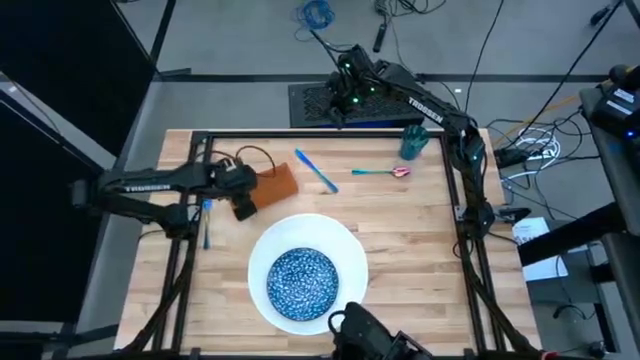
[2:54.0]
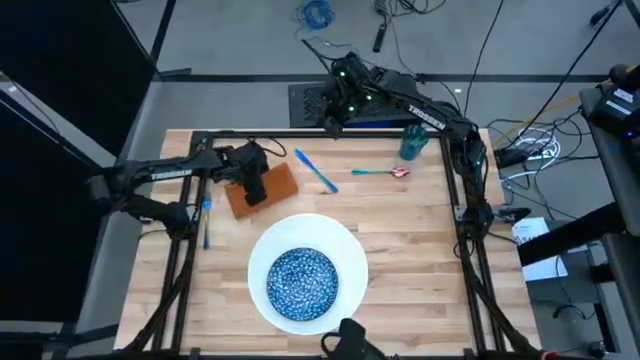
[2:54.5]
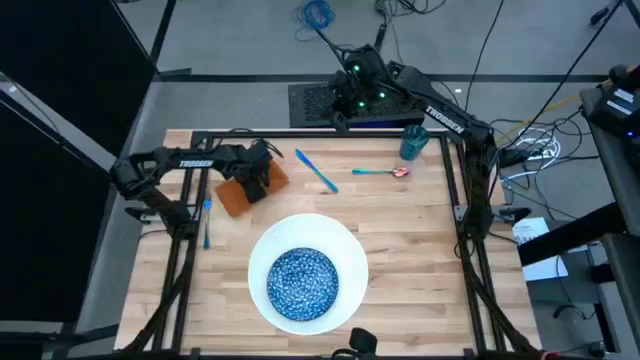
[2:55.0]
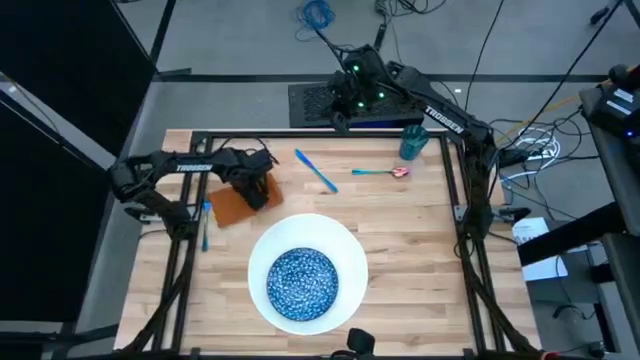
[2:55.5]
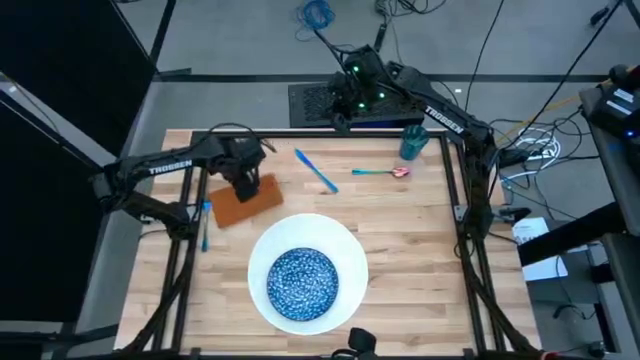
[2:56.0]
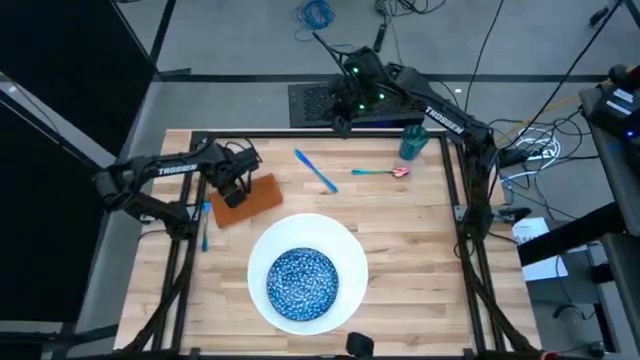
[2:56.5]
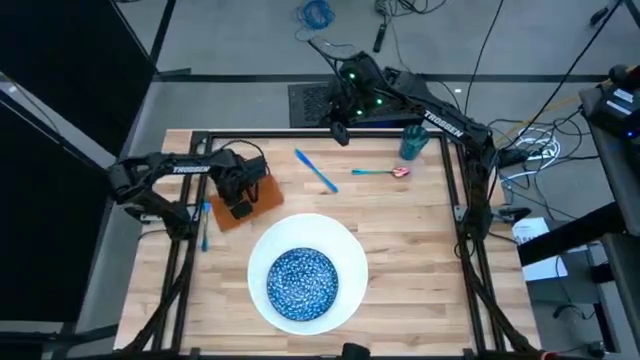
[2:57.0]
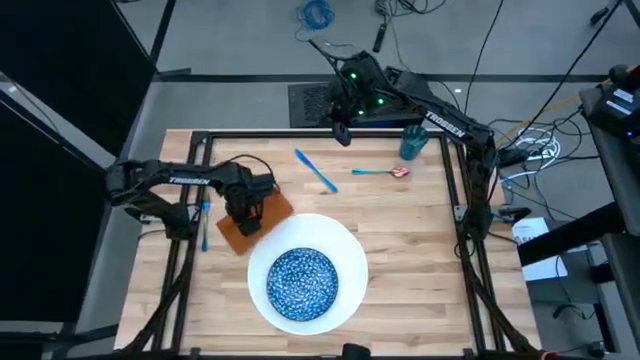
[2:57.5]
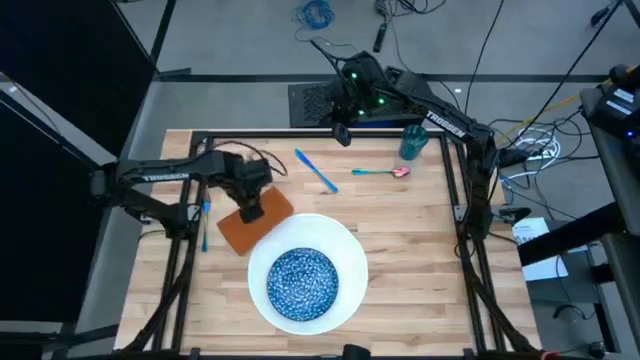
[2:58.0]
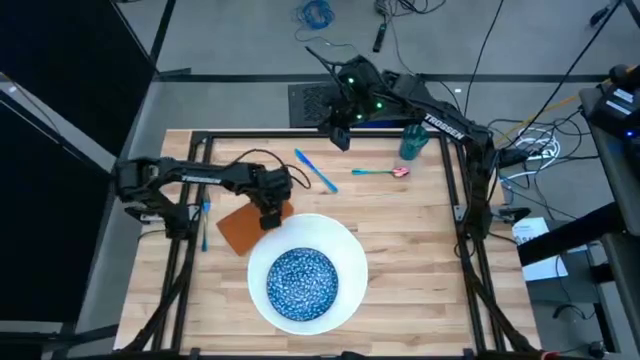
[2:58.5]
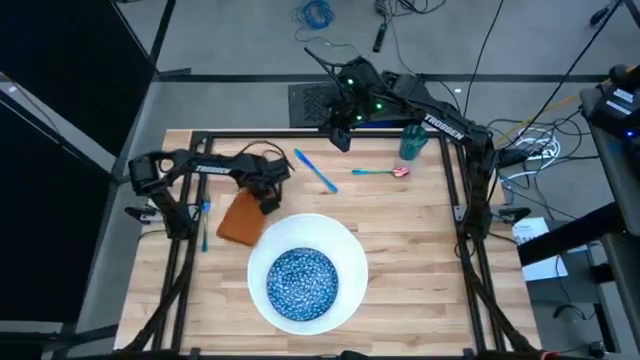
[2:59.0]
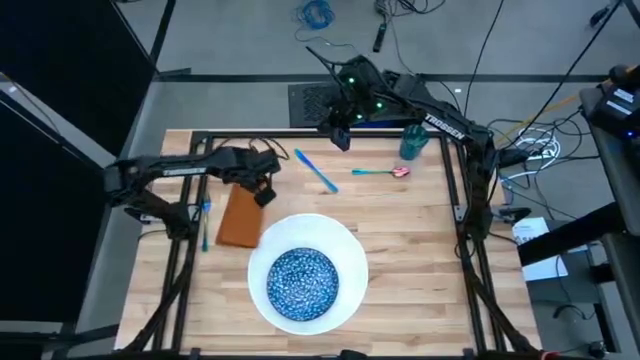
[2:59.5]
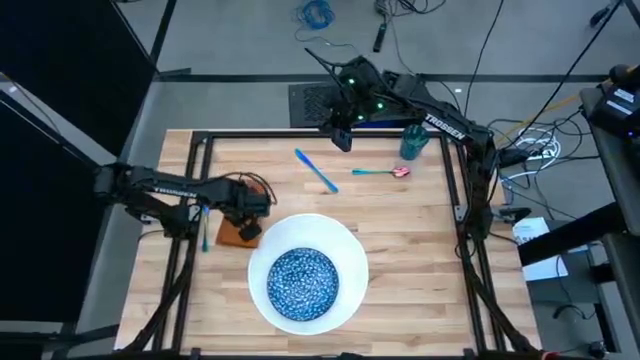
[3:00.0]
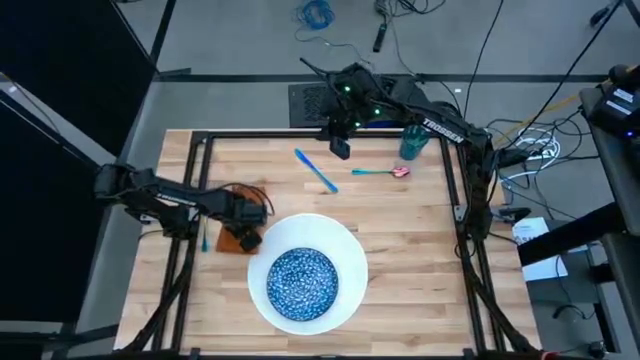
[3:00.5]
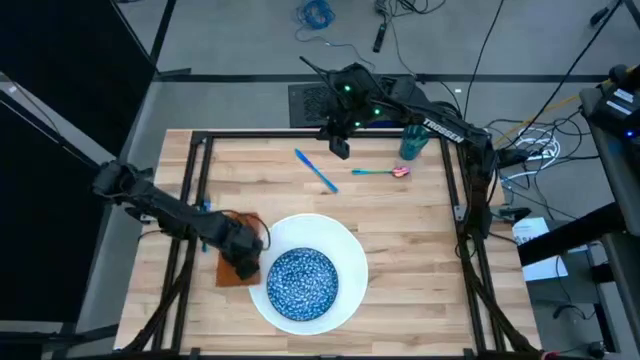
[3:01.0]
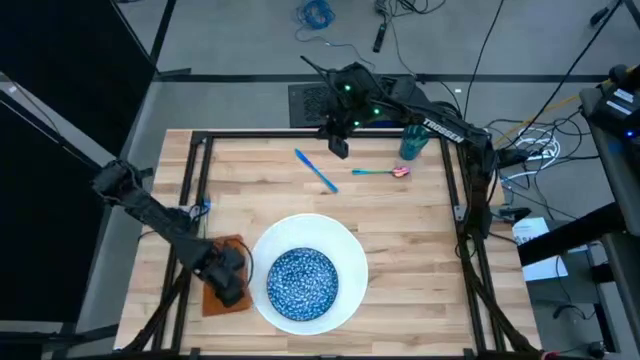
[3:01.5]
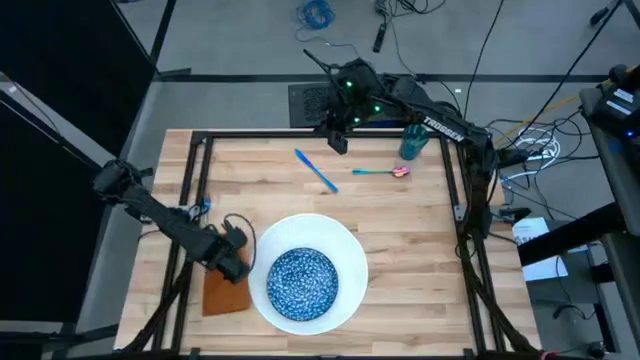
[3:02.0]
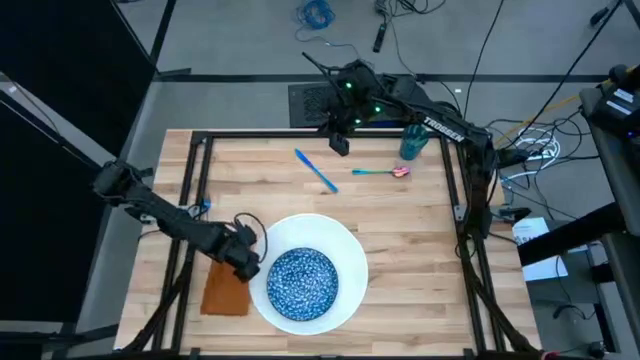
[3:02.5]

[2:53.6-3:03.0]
Task: Set table place
Move the orange table napkin to the left of the white table mat

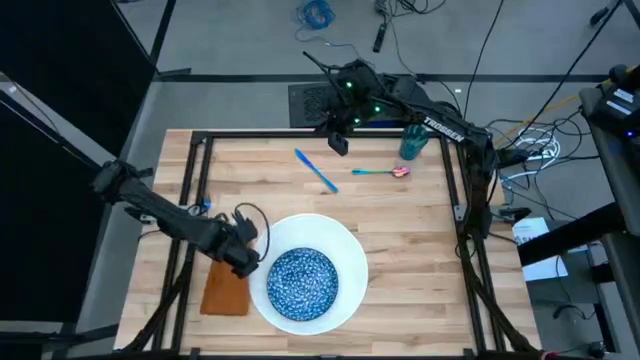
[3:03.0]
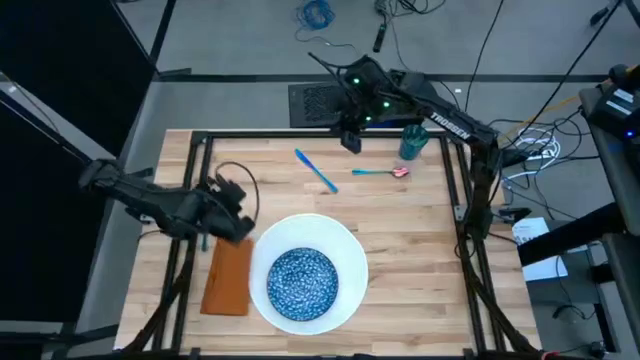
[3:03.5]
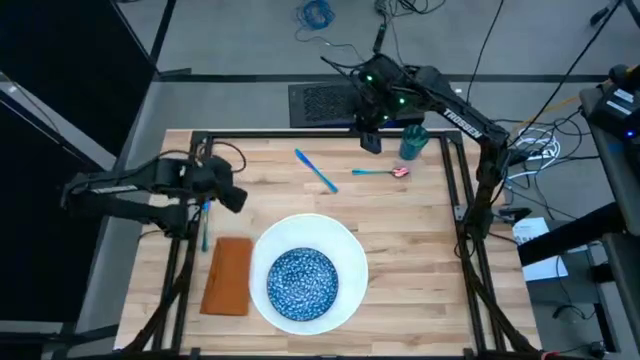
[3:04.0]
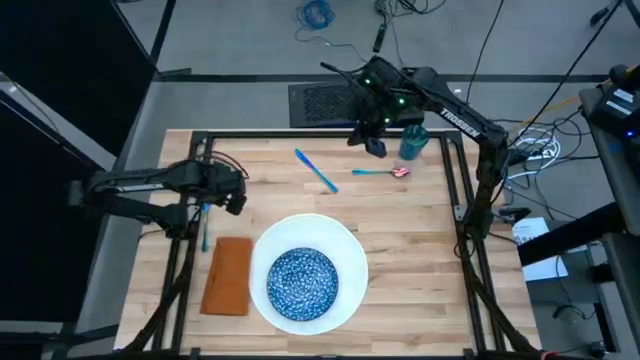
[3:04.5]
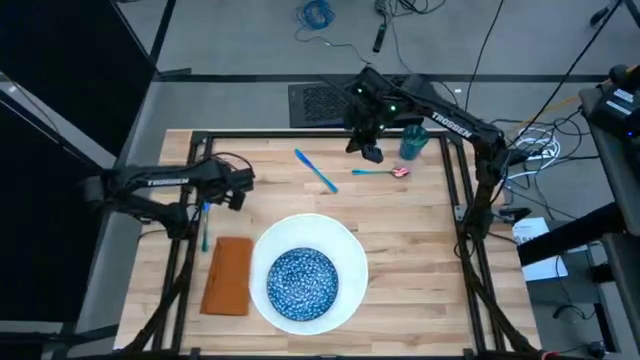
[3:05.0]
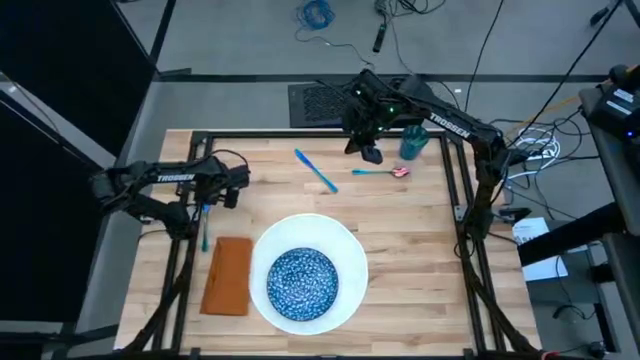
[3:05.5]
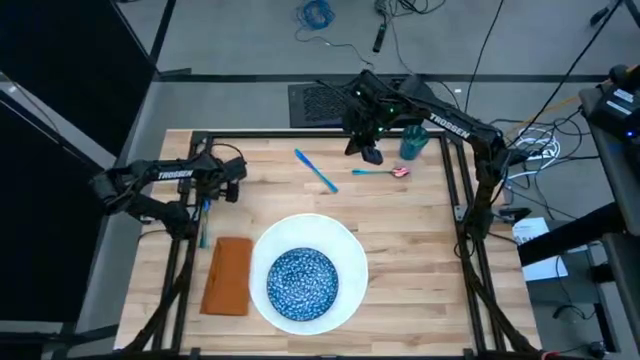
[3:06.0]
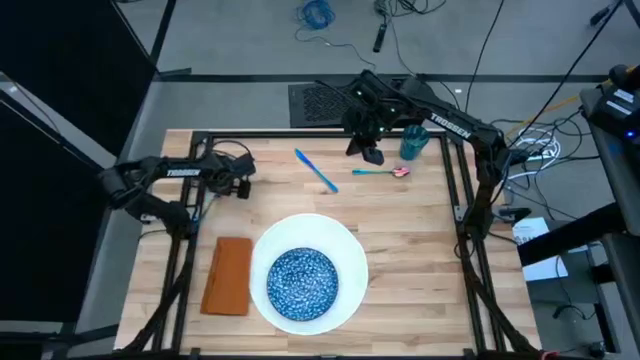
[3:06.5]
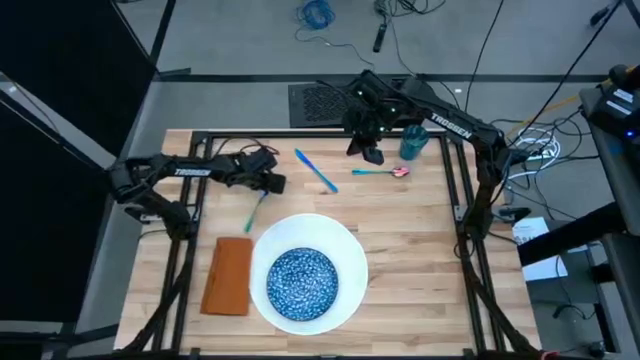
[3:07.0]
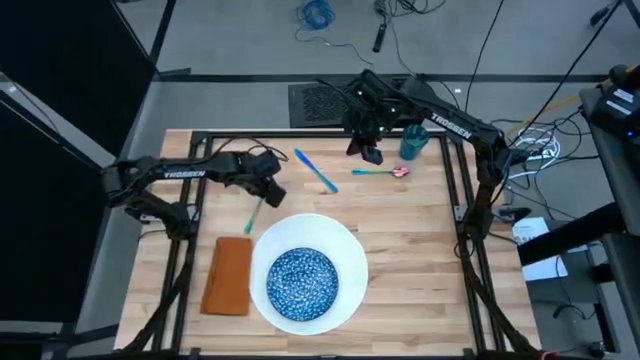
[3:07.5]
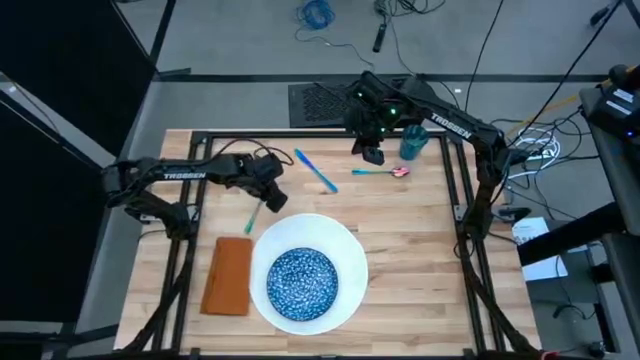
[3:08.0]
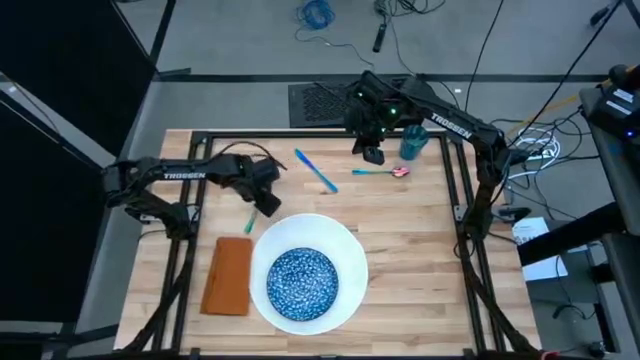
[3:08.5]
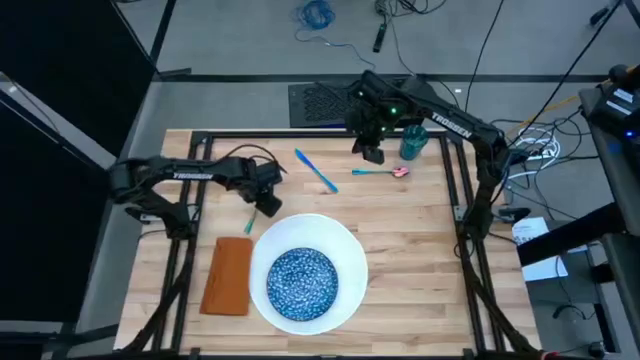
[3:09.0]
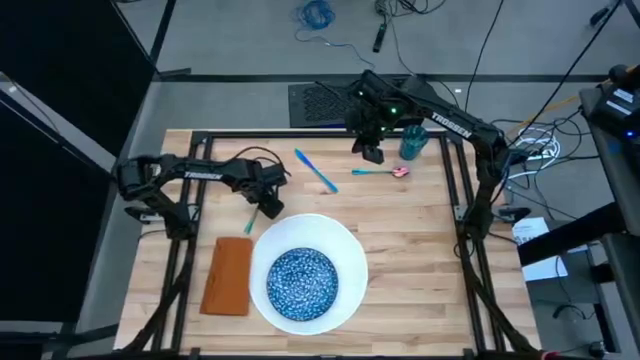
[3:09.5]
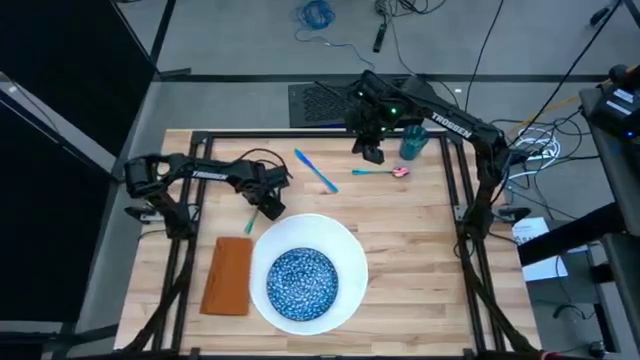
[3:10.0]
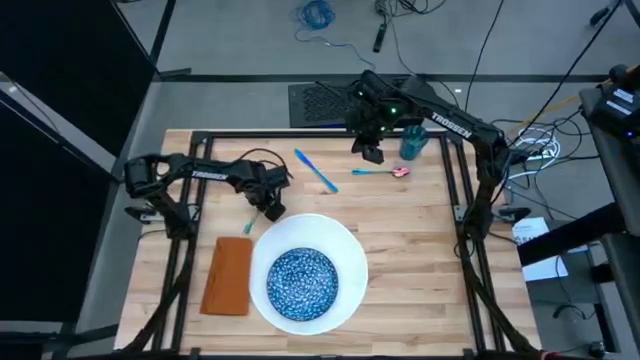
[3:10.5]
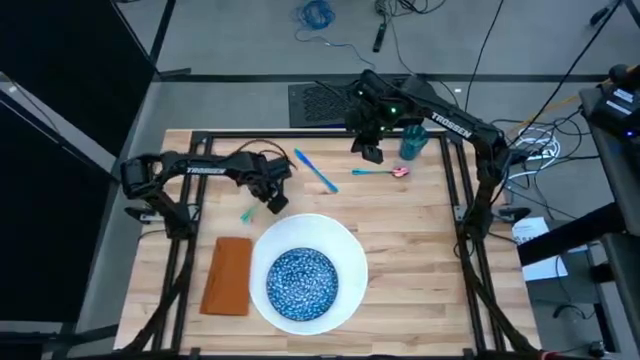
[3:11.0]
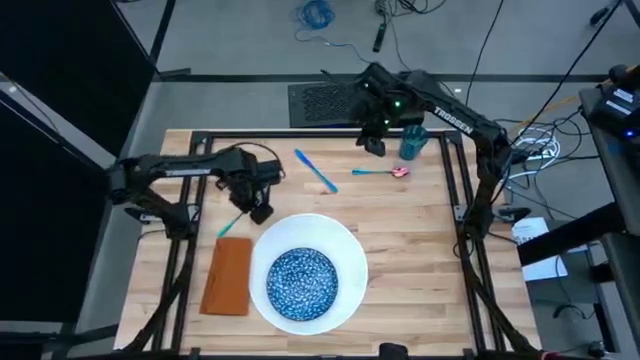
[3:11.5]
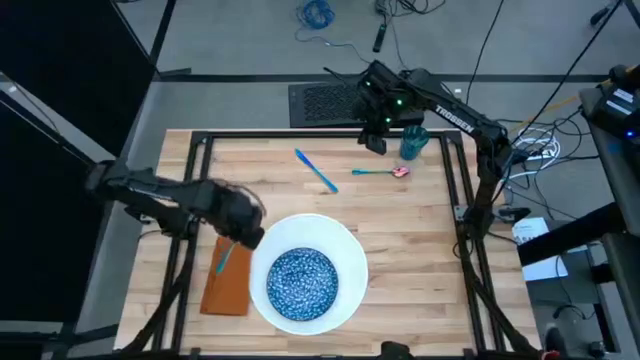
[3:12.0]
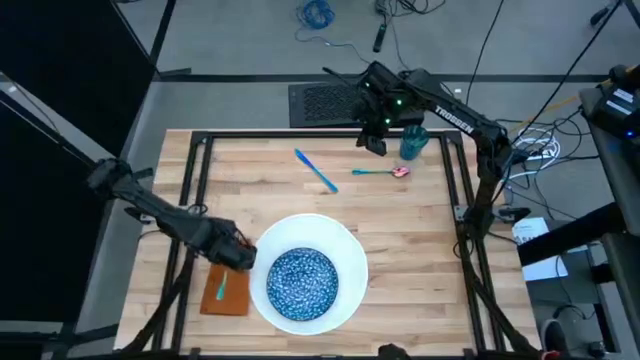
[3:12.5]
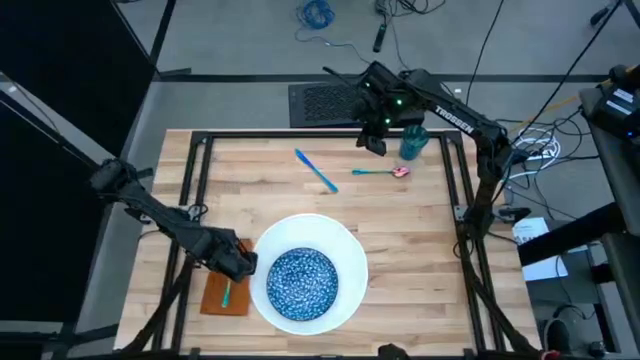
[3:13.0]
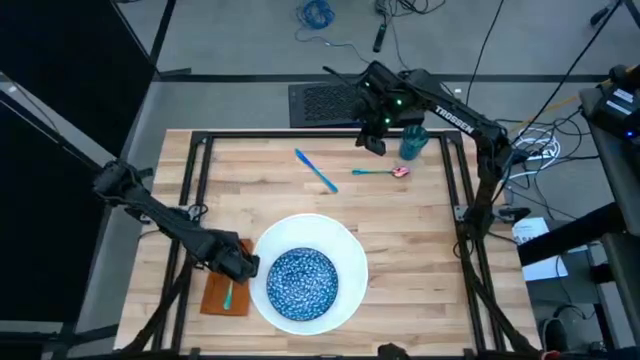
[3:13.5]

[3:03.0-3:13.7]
Put the blue fork on the orange table napkin
